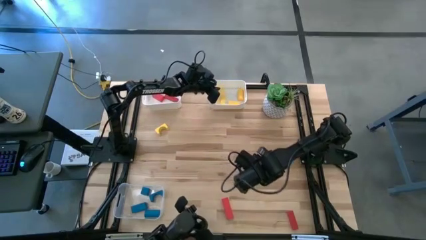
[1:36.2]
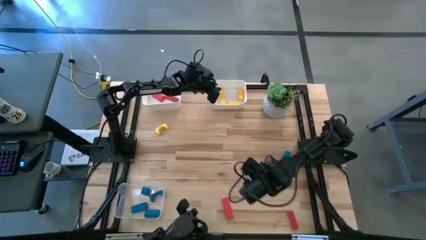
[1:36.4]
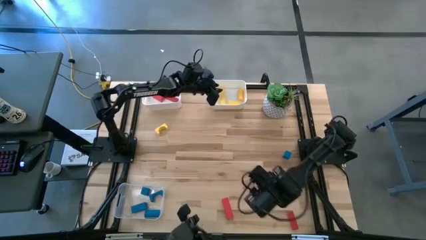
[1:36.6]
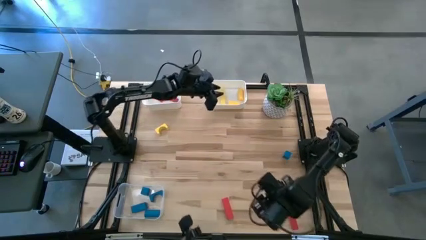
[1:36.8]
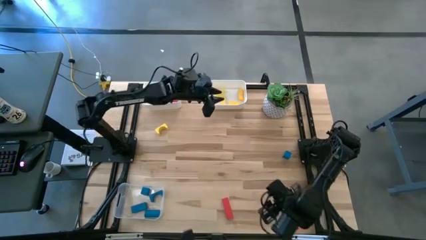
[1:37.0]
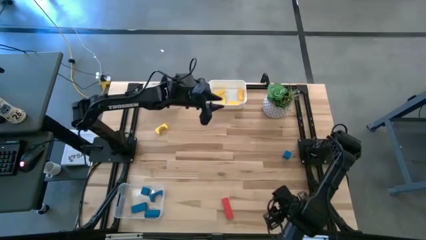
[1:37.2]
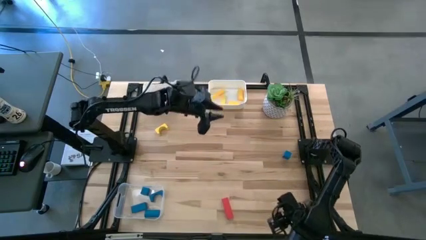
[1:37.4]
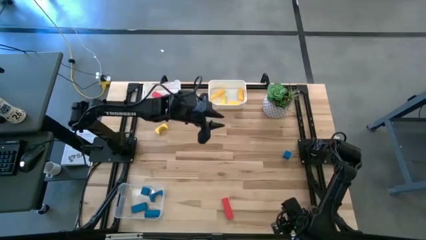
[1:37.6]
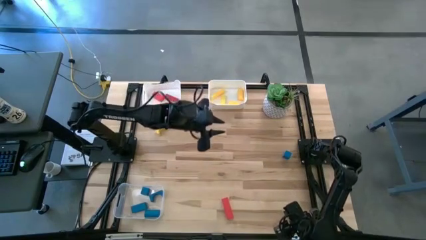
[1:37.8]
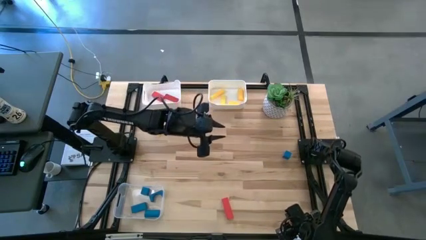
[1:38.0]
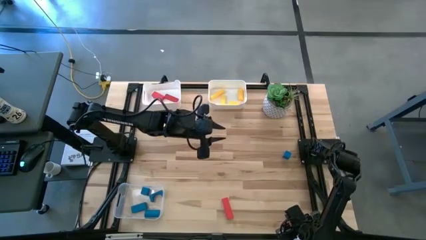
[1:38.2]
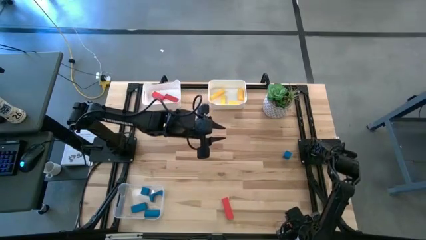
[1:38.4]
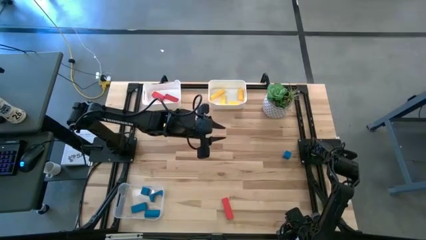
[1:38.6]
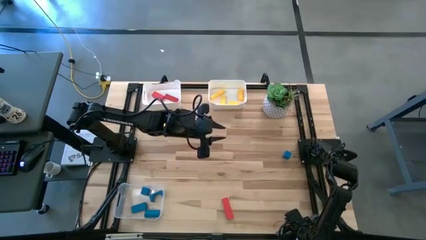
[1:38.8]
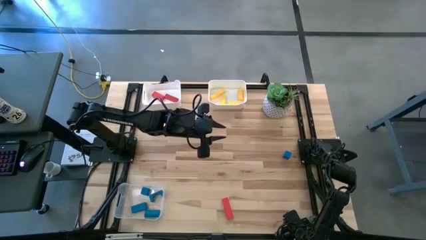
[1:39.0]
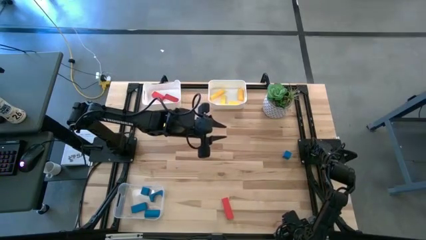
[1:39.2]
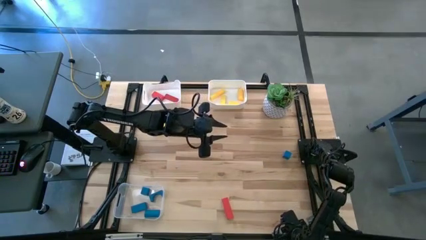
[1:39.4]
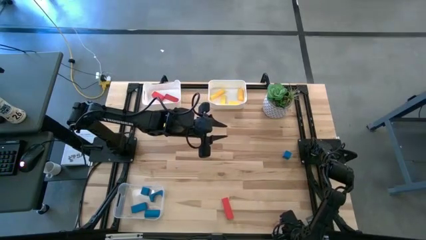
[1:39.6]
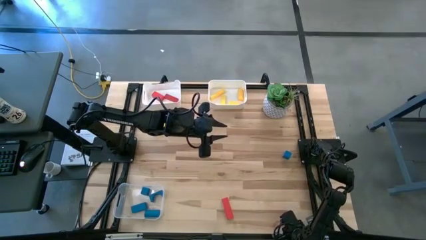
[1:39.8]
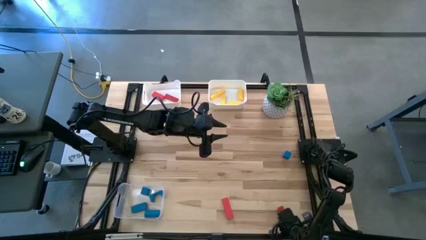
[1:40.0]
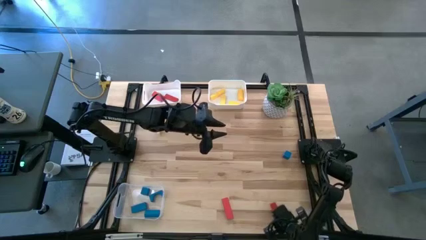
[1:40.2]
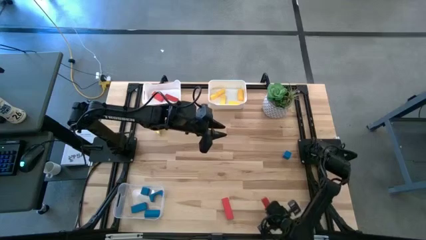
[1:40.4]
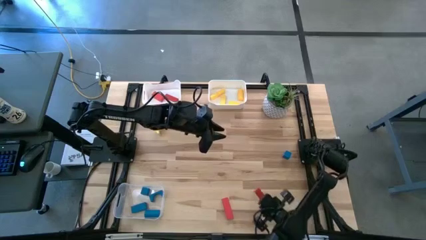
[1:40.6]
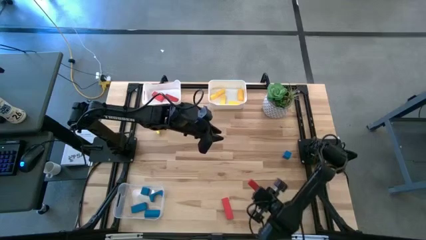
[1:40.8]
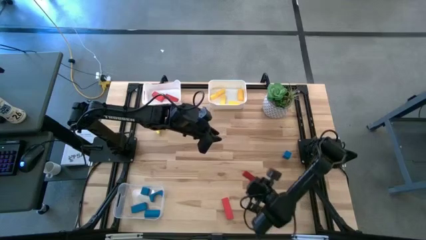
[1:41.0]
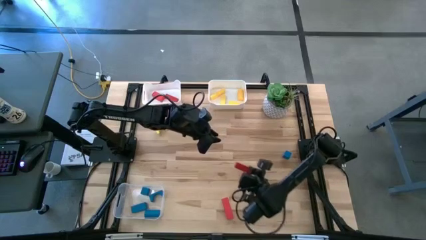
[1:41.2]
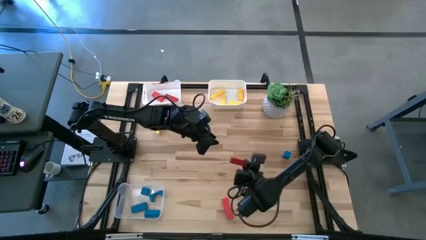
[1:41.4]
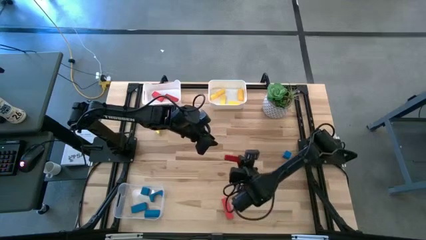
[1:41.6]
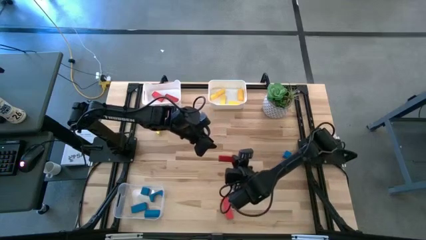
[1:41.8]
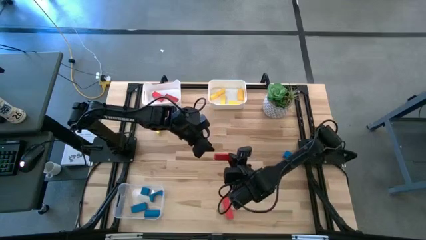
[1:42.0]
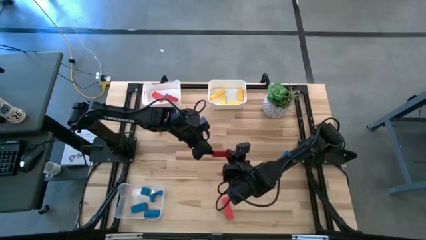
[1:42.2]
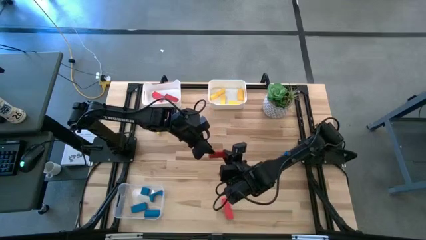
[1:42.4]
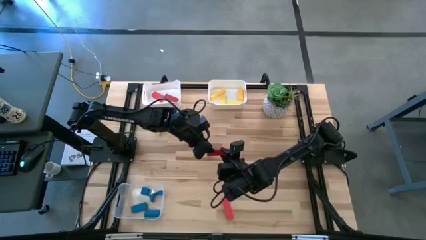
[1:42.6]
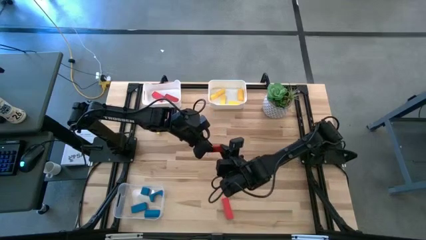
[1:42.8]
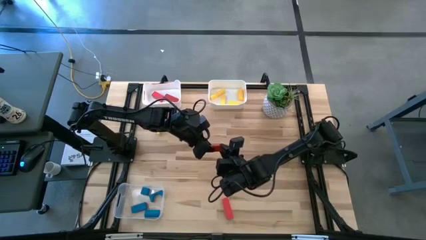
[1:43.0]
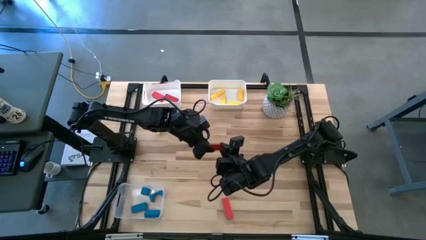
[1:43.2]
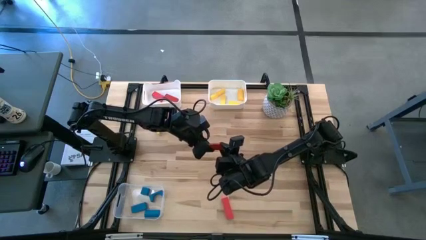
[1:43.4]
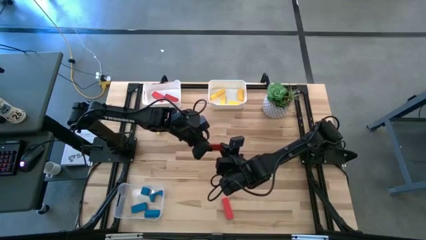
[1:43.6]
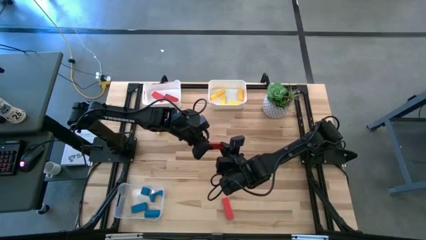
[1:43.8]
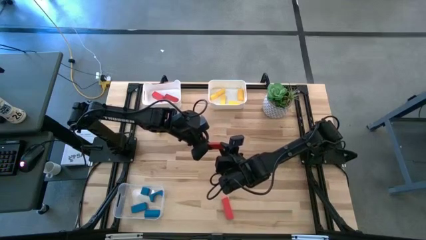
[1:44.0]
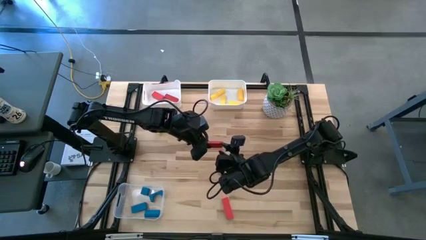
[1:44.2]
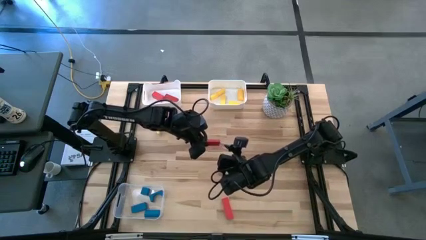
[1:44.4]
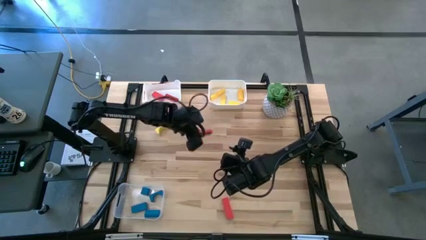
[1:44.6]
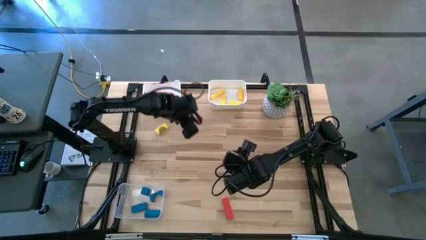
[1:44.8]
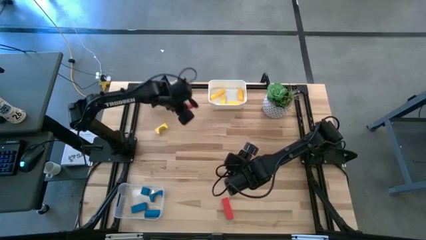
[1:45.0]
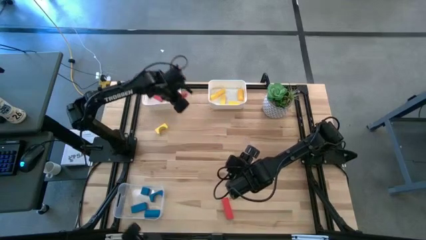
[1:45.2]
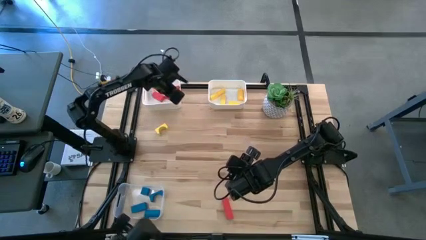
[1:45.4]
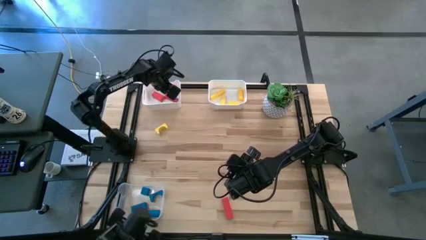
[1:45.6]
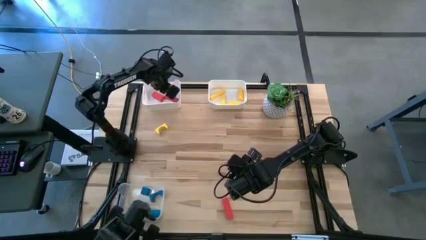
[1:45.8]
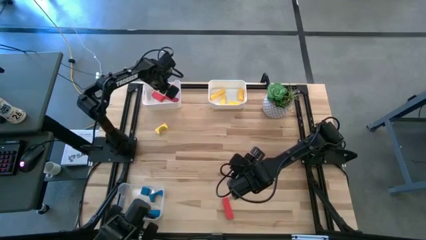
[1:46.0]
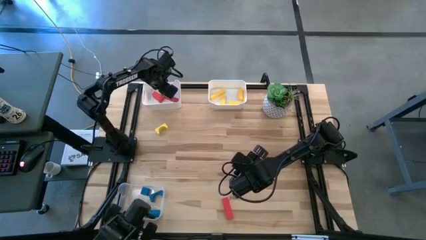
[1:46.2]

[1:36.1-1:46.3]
Task: Sort & place blocks by color
Put the red block into the left white bin

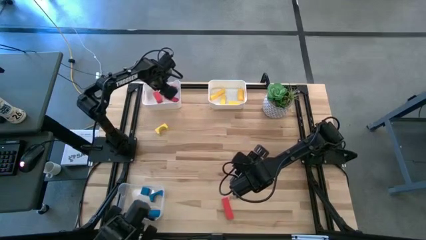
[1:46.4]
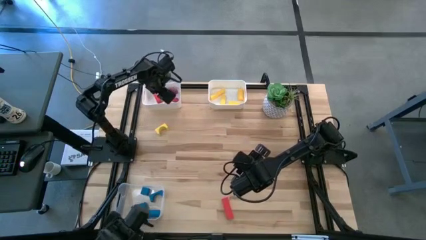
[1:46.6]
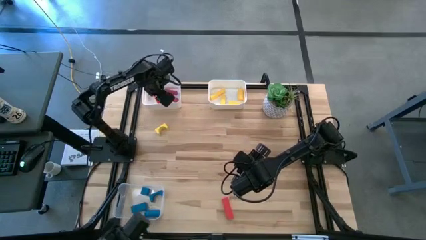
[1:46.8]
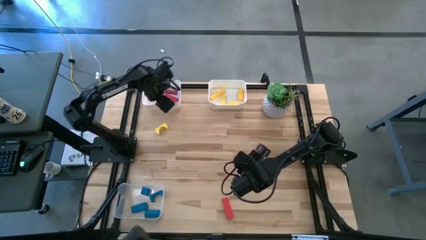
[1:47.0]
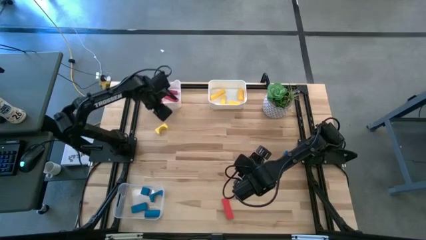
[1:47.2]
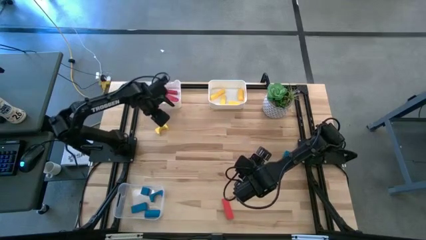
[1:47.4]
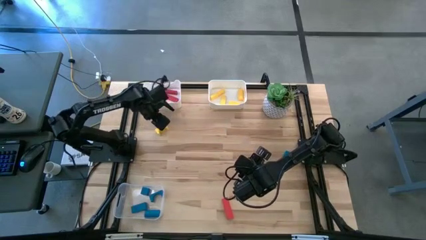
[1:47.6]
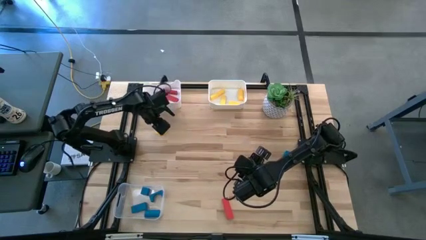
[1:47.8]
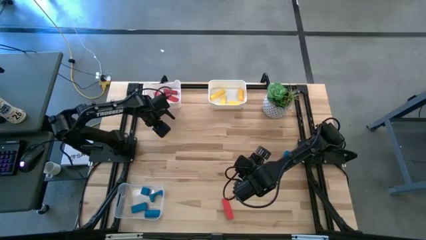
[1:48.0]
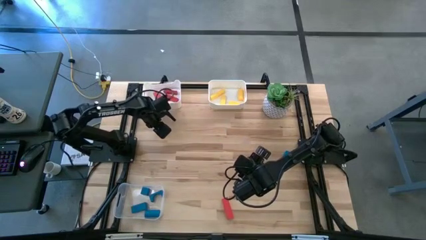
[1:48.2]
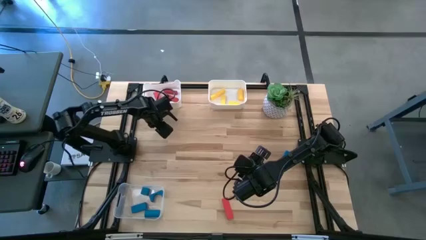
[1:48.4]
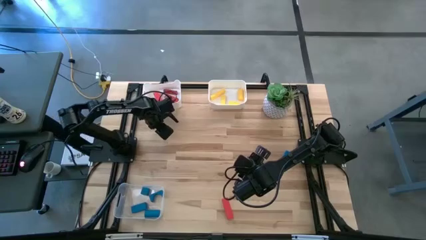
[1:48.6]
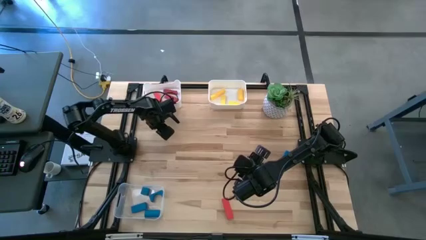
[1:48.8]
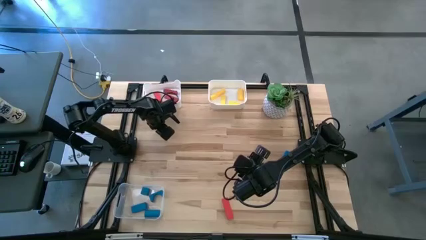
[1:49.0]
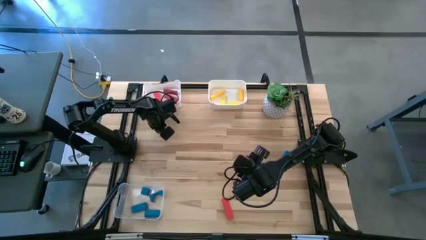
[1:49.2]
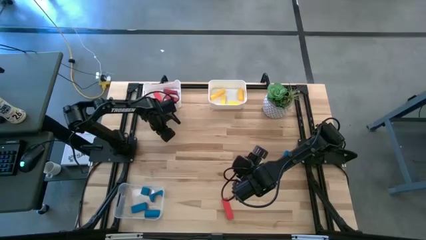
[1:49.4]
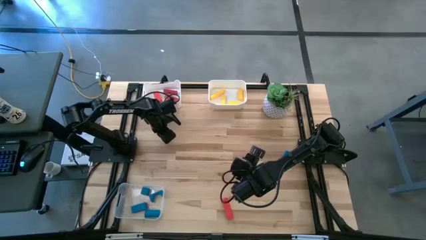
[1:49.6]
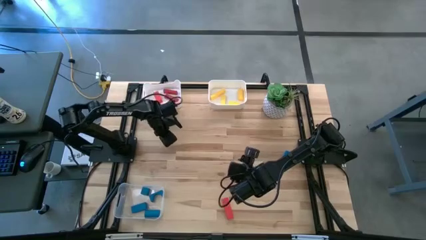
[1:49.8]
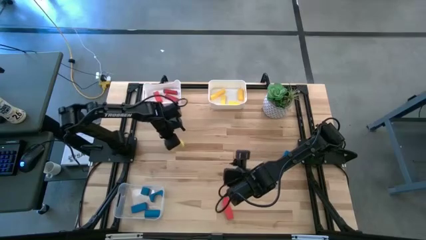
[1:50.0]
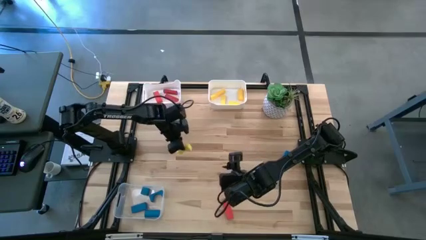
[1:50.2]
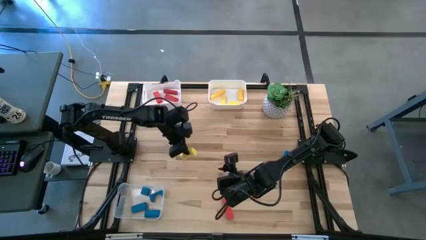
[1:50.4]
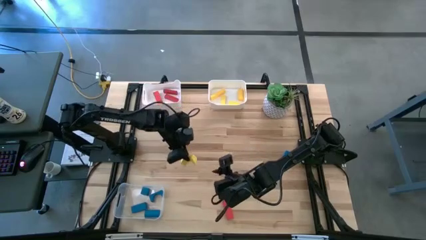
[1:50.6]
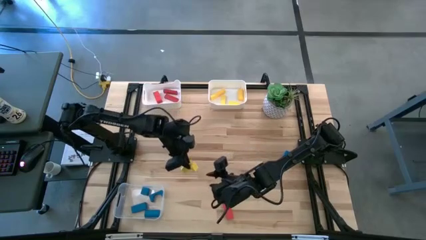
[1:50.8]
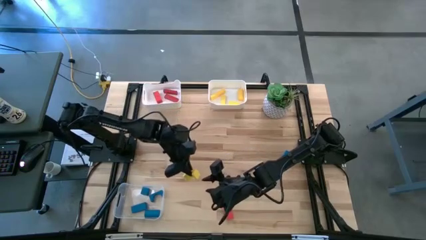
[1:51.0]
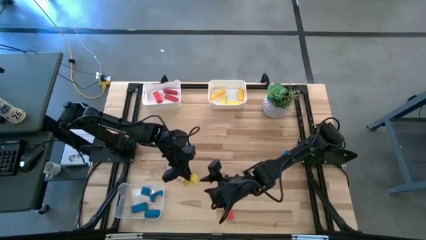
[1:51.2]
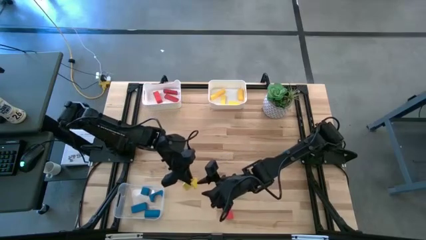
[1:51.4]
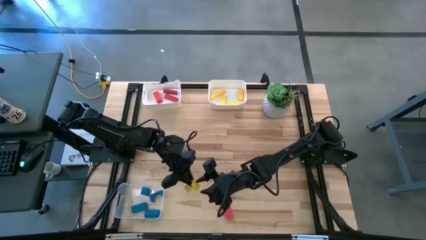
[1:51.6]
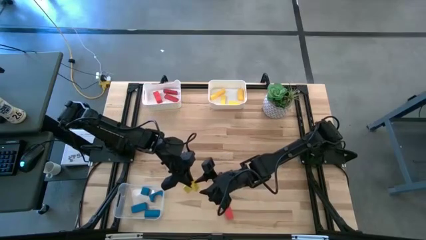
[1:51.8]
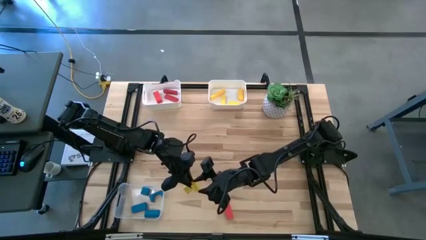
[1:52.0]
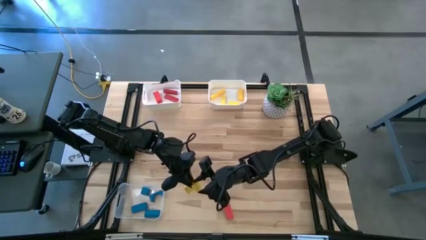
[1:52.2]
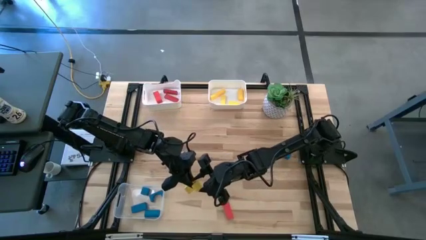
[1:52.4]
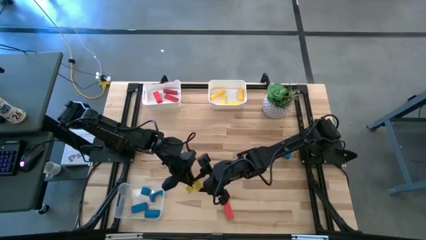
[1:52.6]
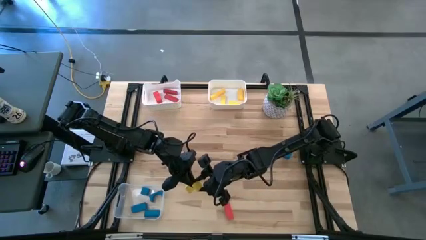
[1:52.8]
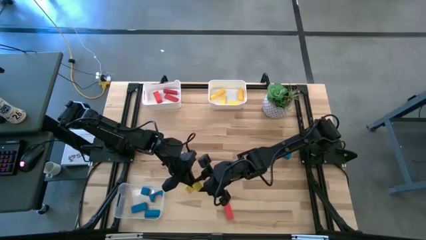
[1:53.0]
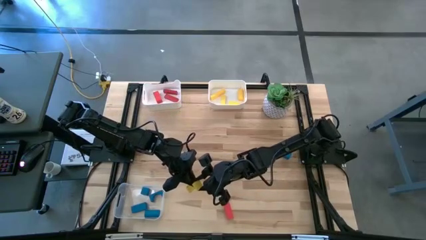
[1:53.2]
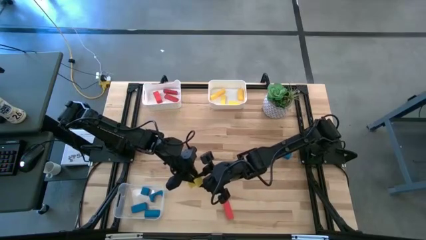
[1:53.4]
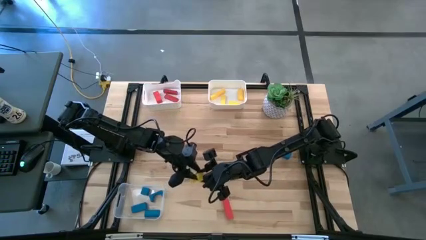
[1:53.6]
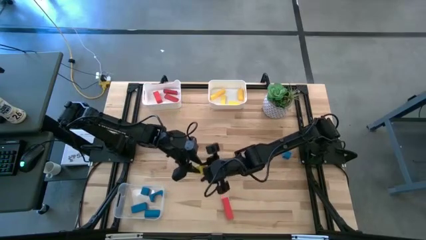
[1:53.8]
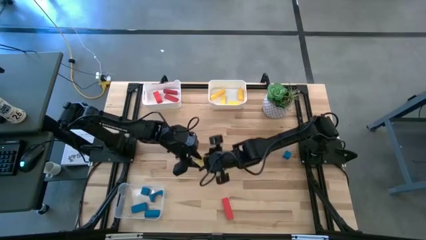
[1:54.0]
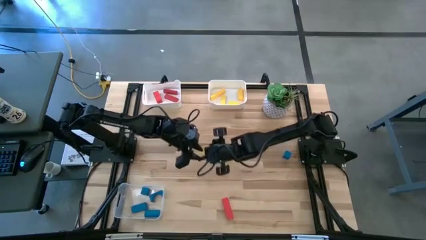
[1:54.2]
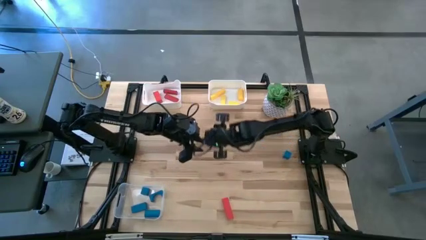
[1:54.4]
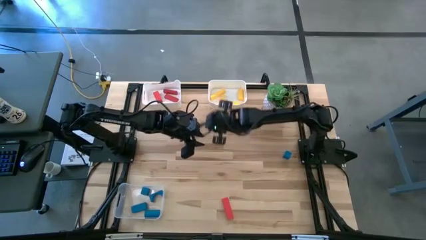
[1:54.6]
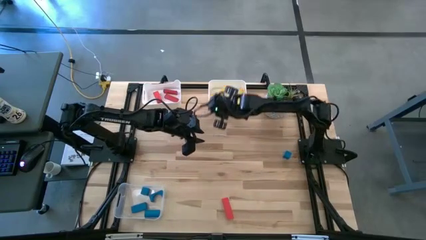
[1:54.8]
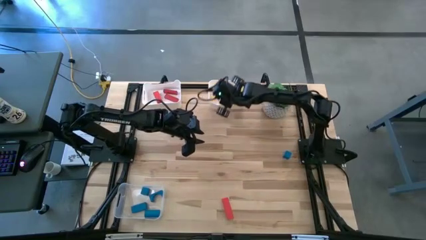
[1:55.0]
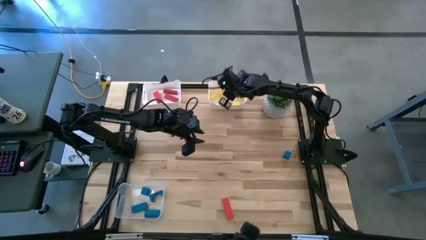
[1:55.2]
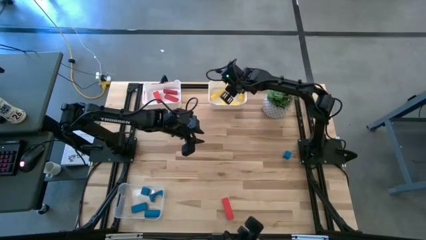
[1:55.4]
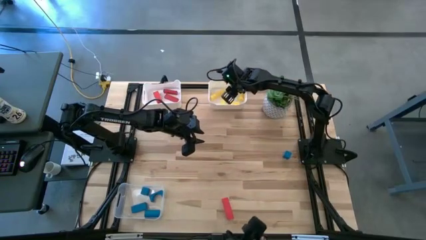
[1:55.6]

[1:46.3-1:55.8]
Put the yellow block into the right white bin
